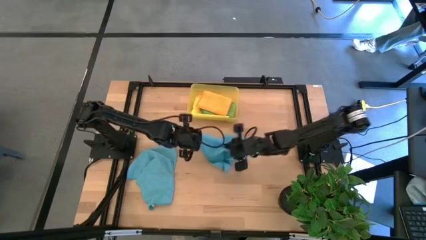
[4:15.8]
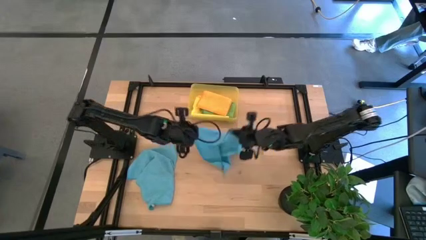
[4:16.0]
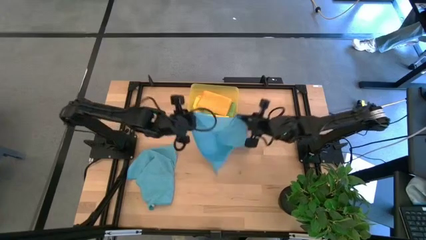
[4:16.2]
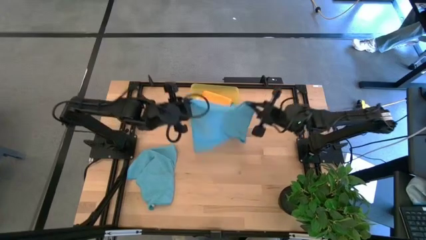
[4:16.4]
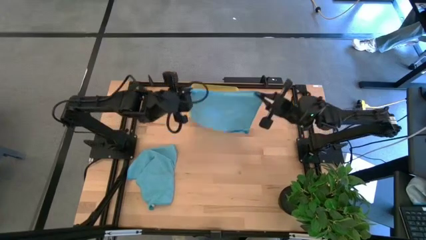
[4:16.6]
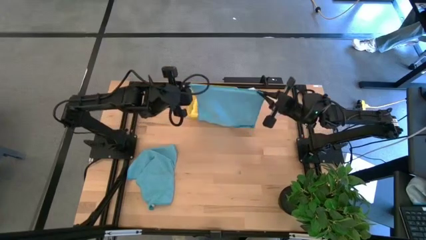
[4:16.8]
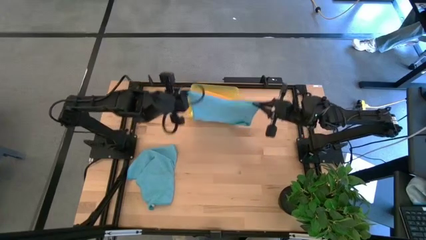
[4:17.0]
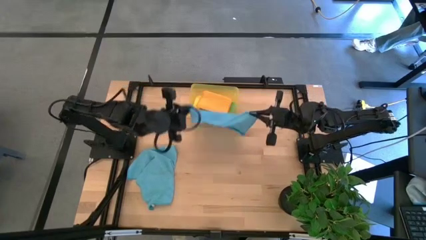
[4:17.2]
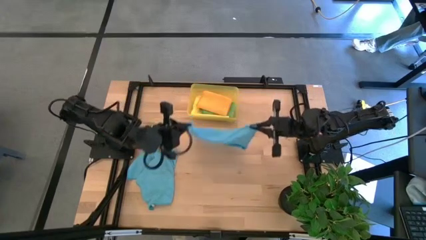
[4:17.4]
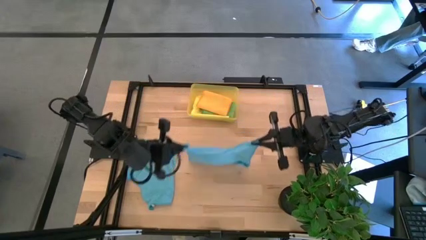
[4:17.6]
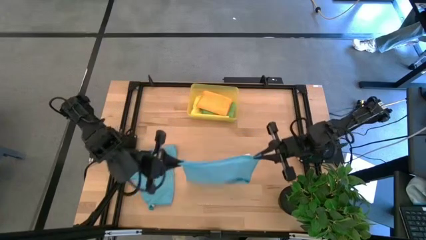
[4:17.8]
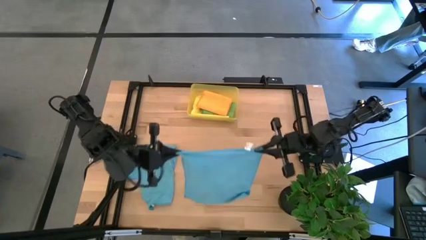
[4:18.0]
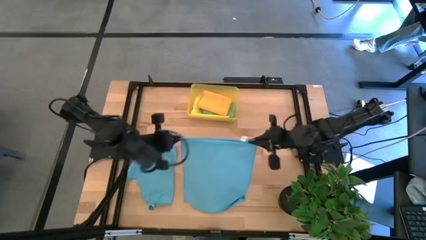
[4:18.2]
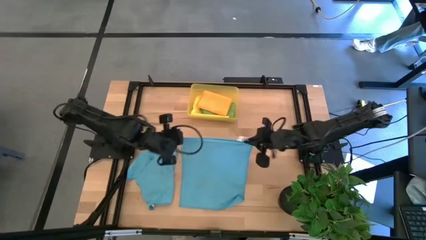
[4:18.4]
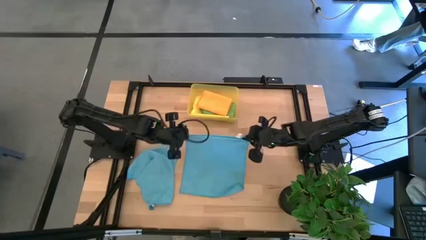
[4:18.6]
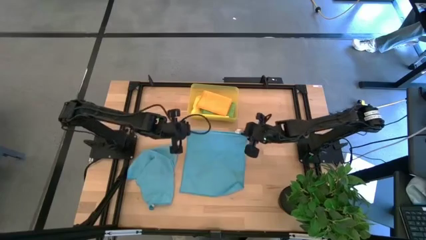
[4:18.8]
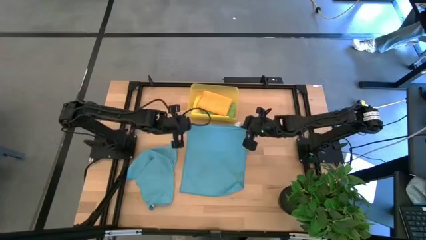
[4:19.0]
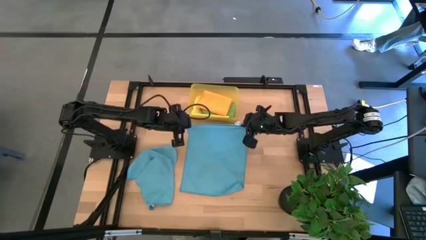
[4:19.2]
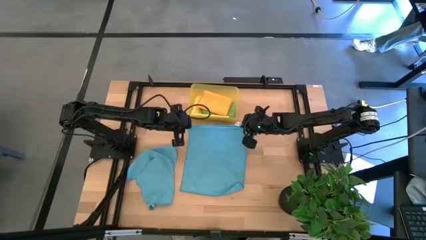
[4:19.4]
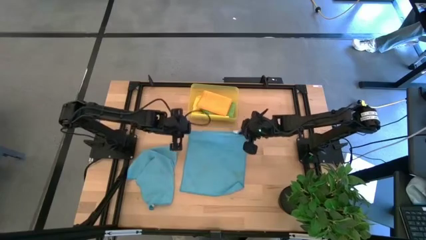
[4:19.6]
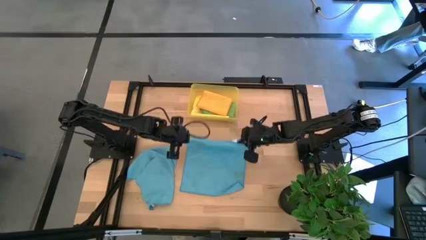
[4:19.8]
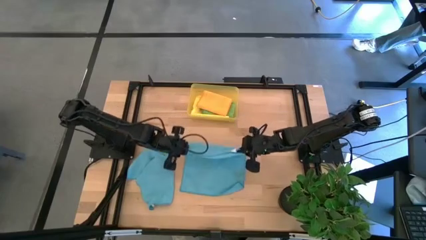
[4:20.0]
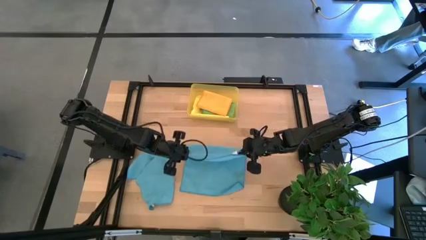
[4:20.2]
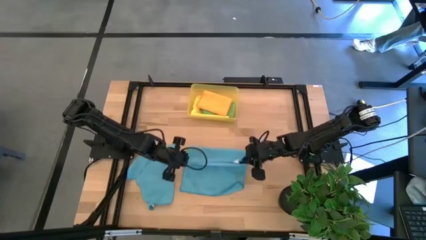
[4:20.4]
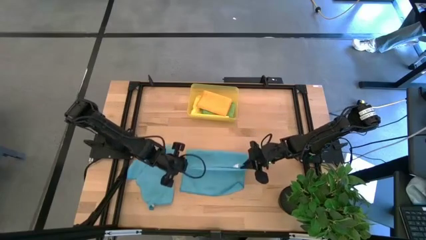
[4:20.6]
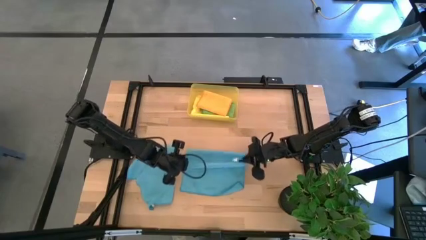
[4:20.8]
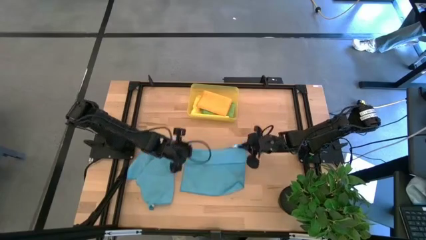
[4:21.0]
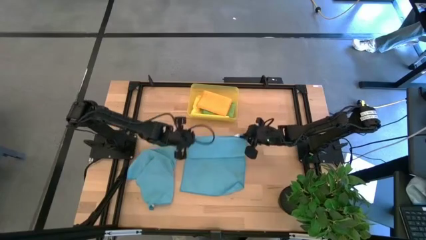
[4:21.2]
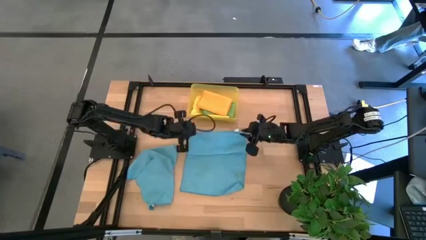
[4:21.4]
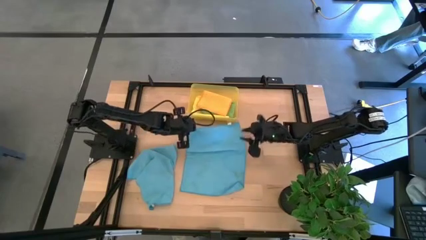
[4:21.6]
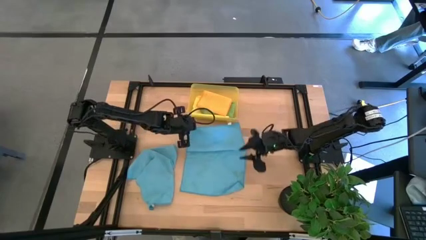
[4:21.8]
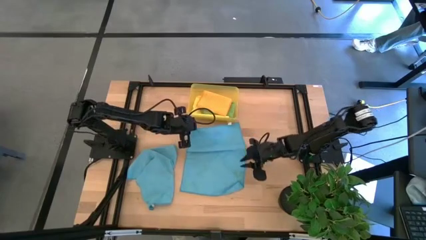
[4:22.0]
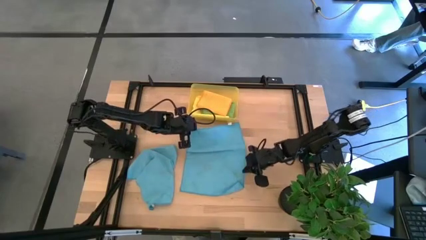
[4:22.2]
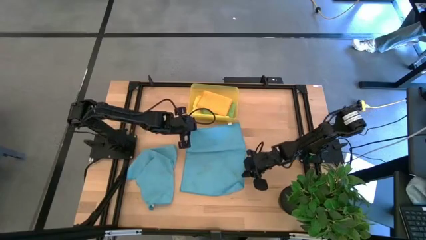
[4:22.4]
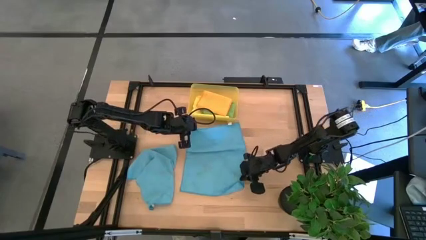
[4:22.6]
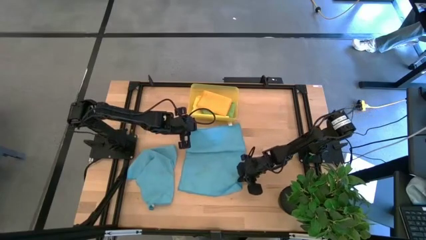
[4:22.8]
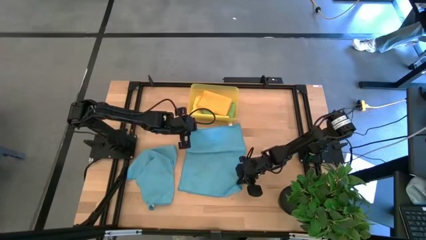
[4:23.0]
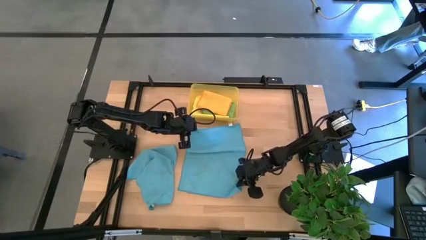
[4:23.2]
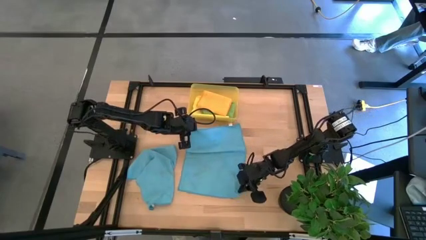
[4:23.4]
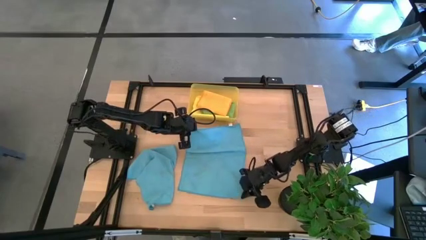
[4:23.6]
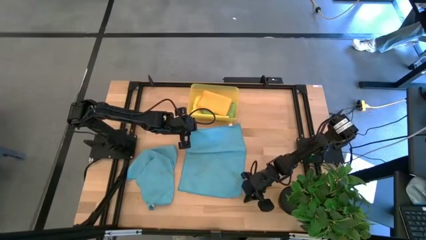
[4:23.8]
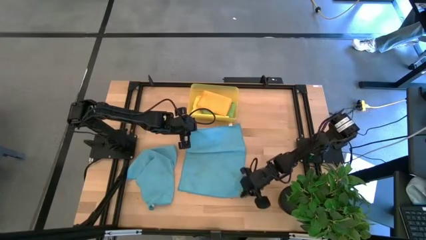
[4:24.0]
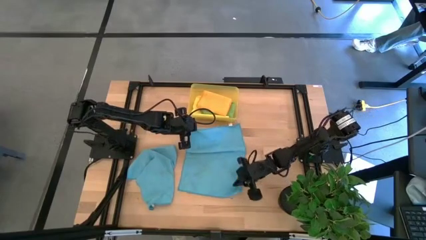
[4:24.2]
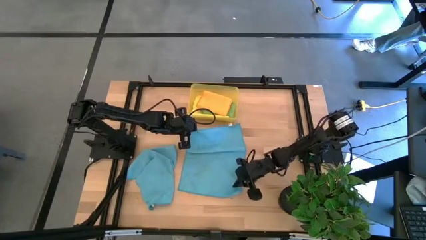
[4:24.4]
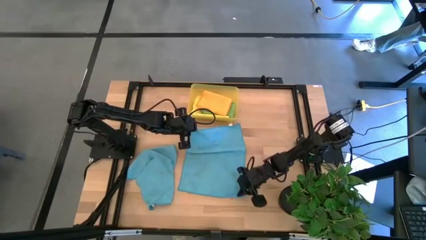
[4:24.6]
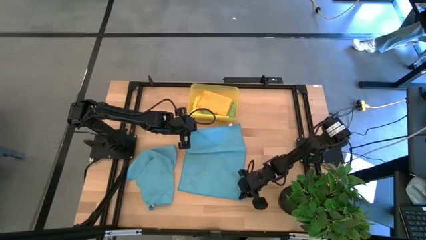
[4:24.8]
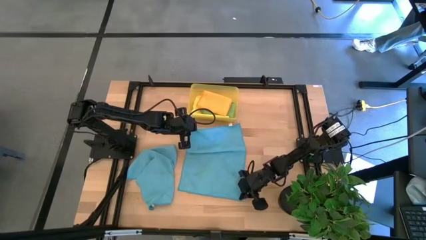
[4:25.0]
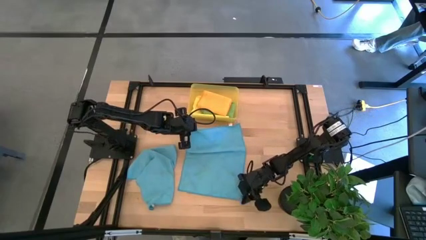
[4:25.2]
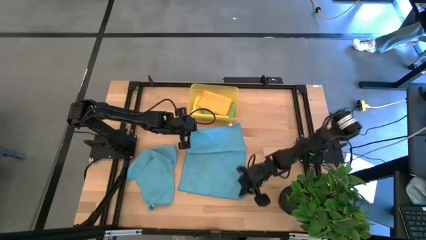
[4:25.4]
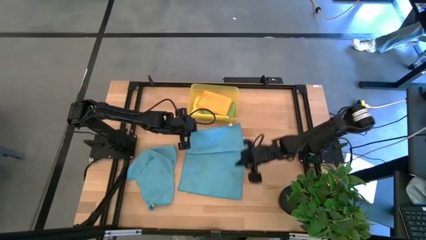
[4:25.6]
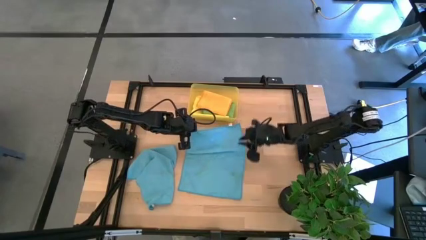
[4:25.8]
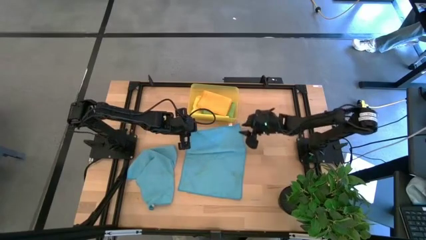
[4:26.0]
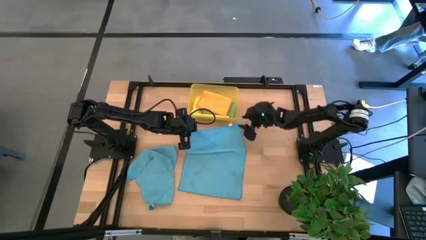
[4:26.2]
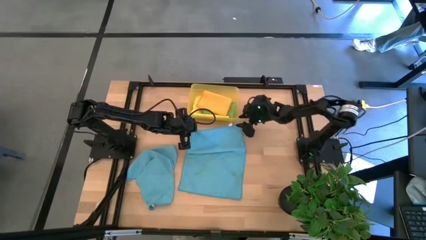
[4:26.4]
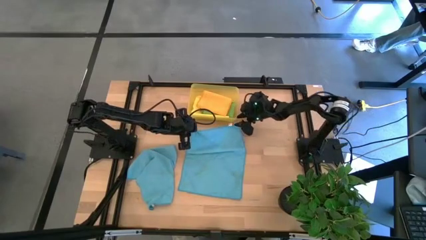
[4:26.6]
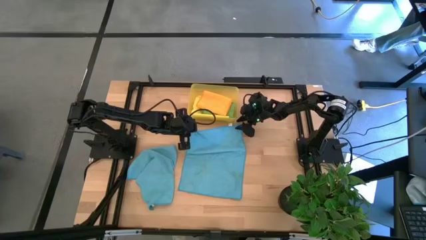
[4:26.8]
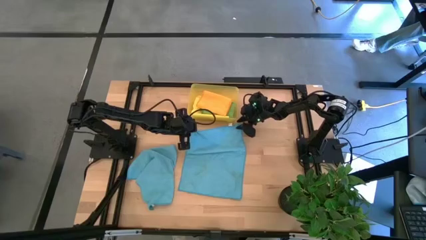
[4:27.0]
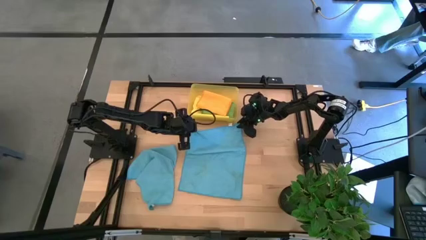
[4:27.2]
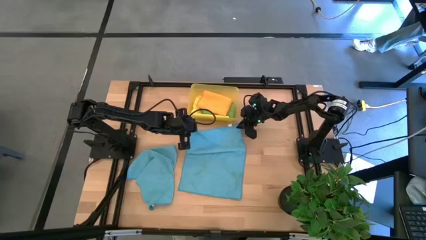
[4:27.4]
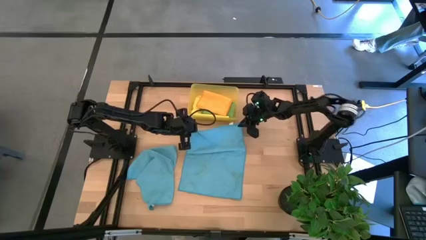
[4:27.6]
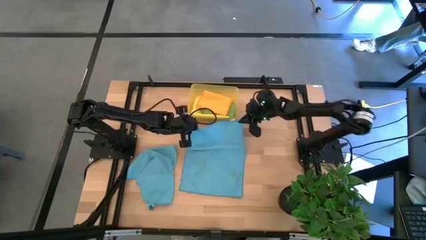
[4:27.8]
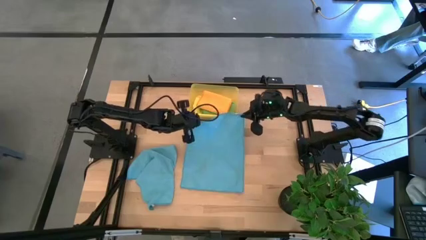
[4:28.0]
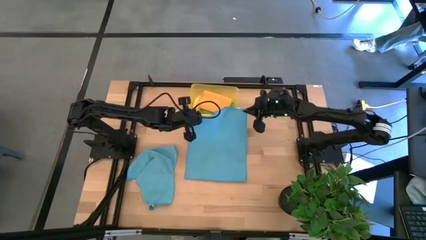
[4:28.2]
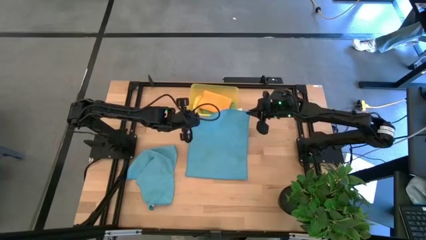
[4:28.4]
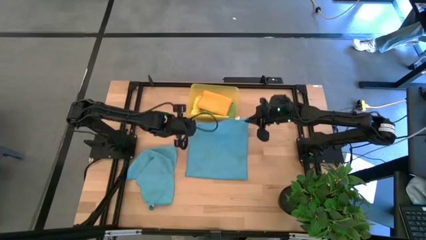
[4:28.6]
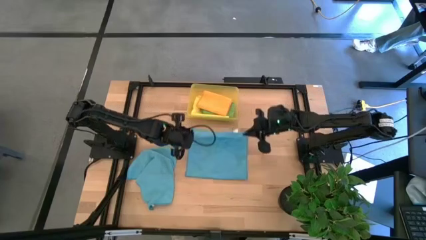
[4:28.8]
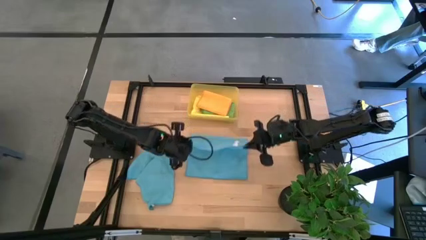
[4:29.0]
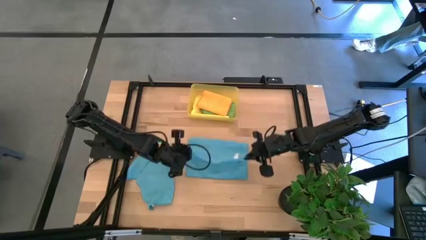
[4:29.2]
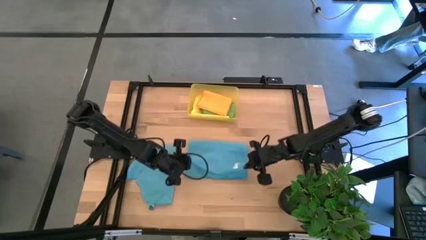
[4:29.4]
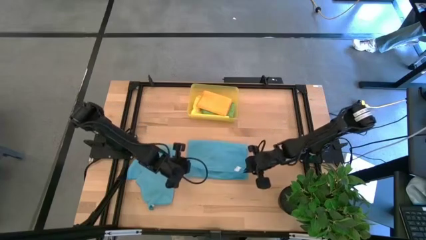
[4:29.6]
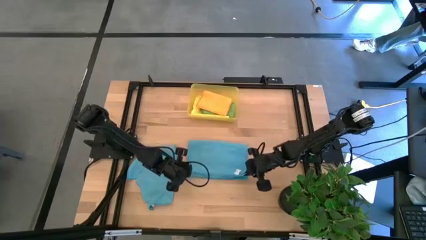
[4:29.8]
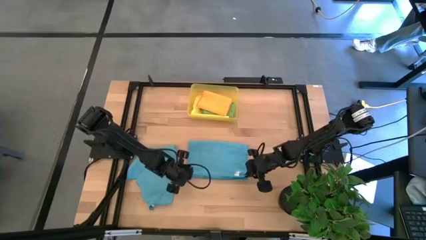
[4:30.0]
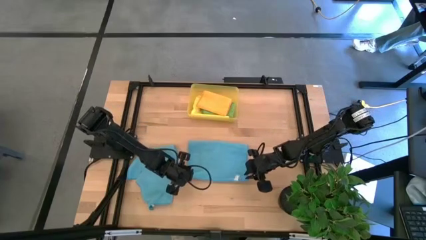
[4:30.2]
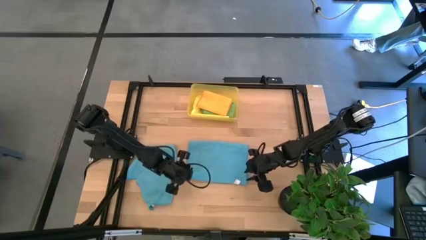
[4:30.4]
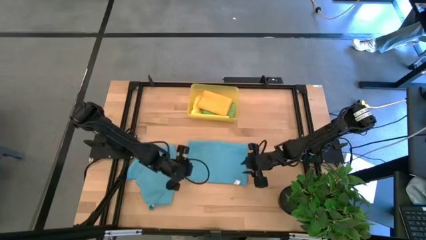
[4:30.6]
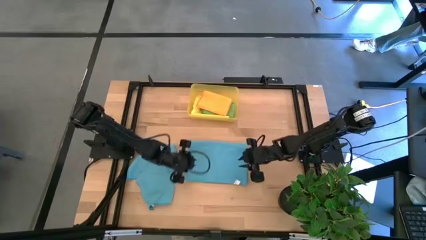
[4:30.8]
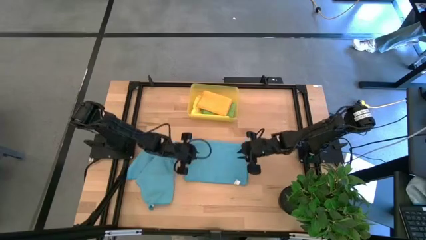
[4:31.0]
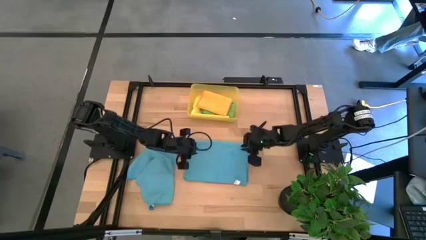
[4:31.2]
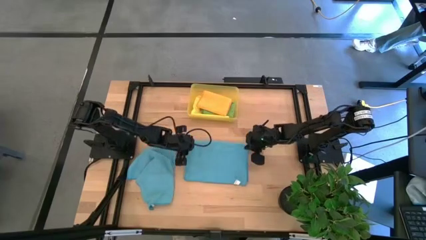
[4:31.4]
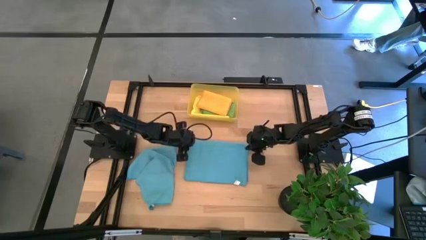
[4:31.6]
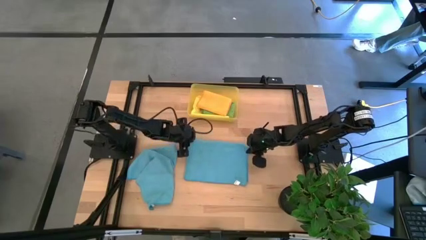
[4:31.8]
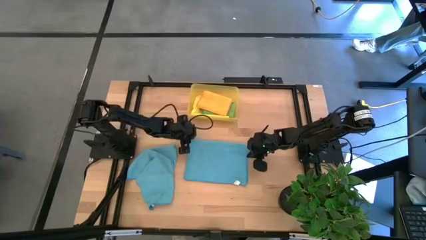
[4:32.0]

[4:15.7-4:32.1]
Task: Fold microfiber towels
Fold the right blue towel
